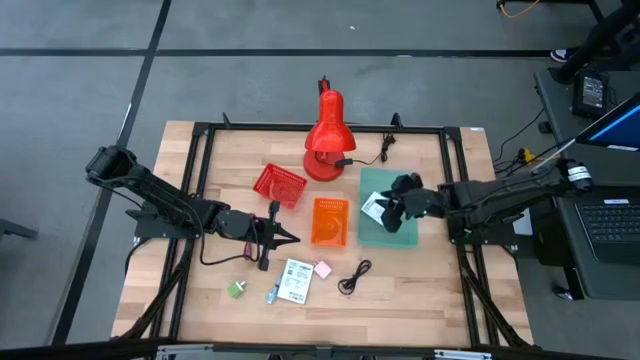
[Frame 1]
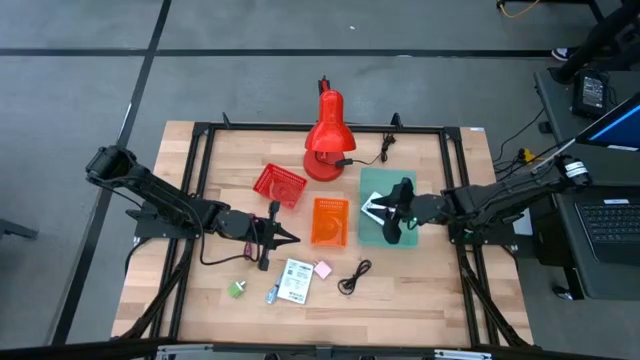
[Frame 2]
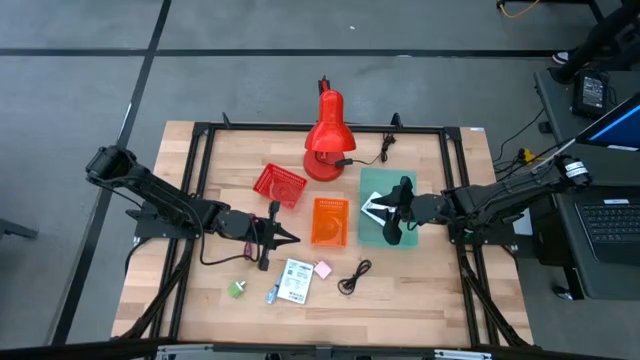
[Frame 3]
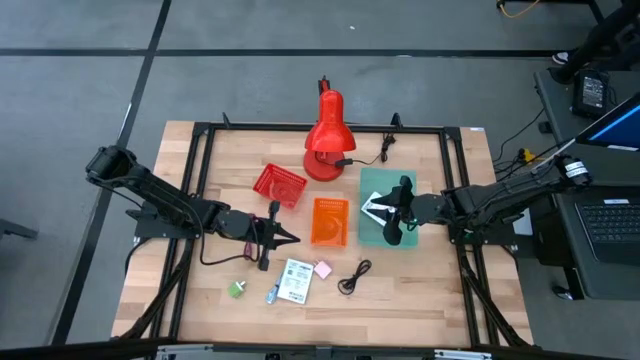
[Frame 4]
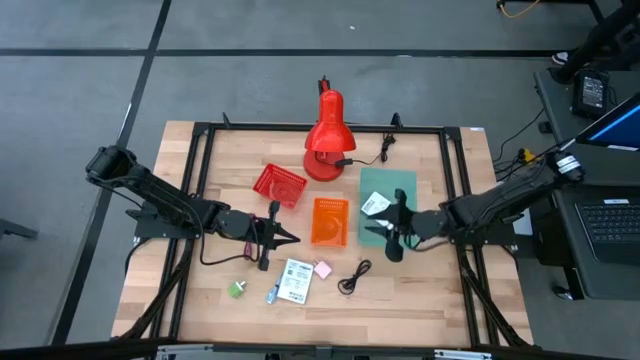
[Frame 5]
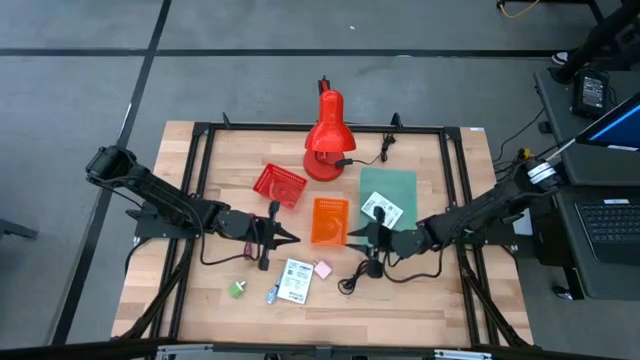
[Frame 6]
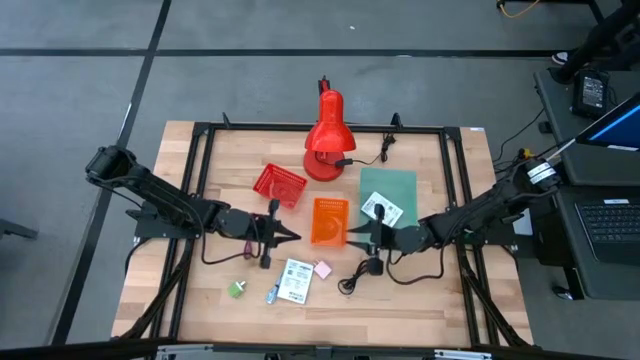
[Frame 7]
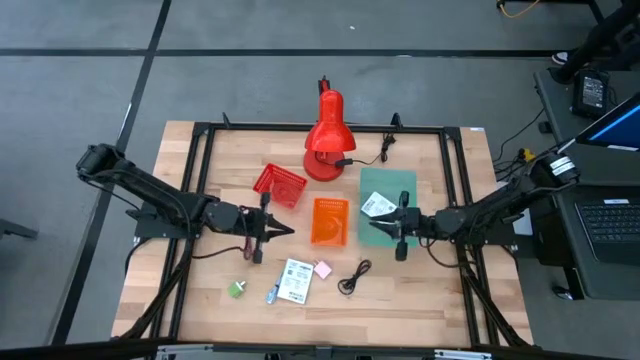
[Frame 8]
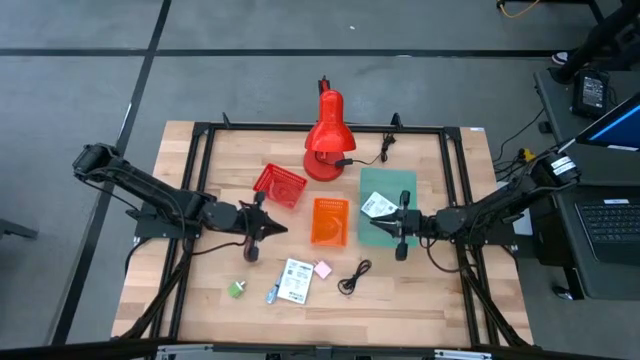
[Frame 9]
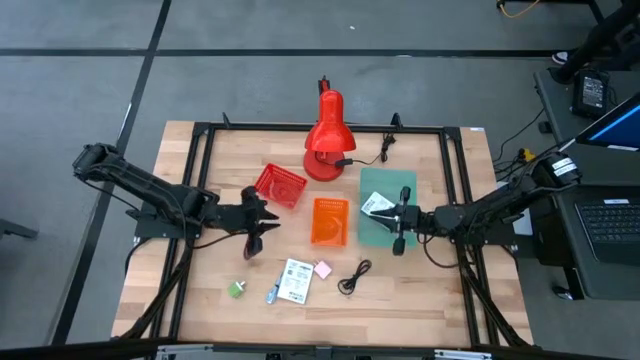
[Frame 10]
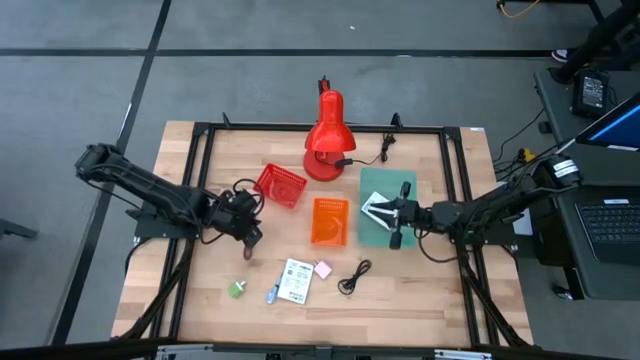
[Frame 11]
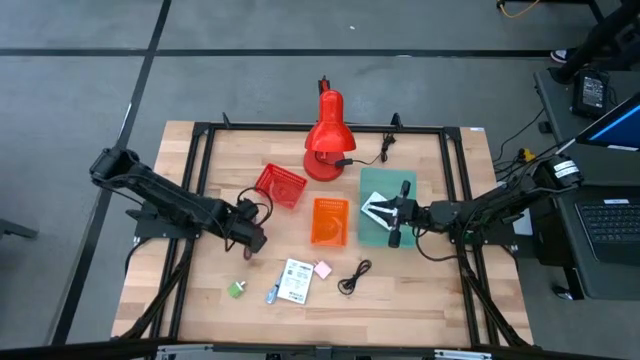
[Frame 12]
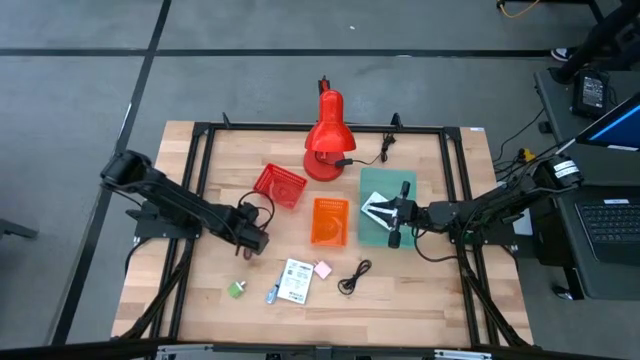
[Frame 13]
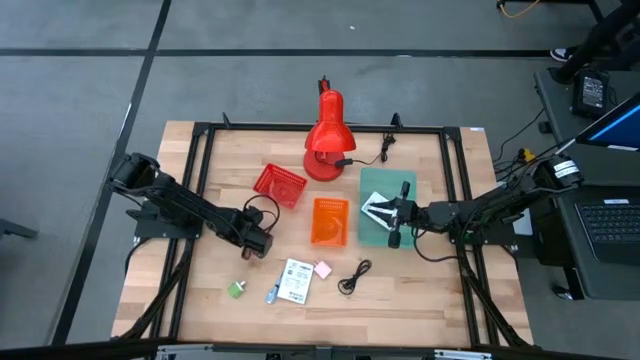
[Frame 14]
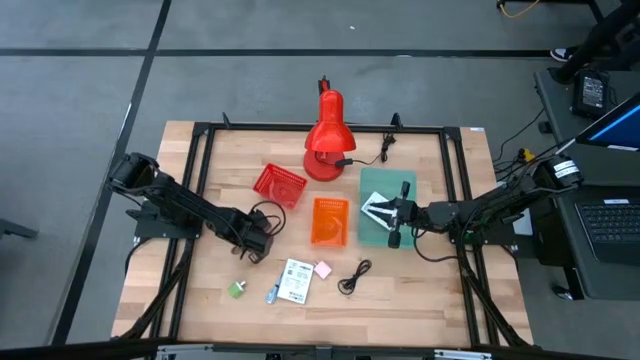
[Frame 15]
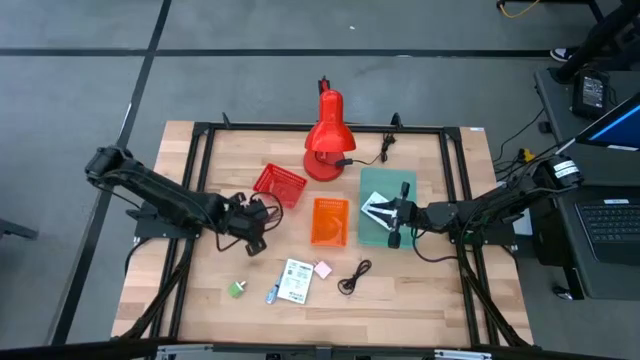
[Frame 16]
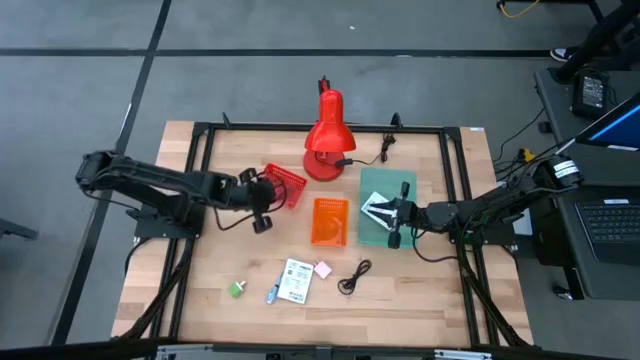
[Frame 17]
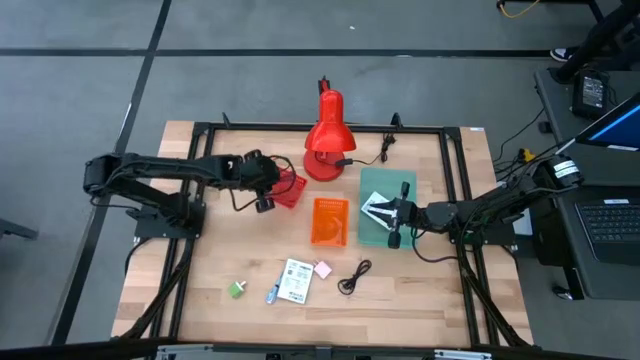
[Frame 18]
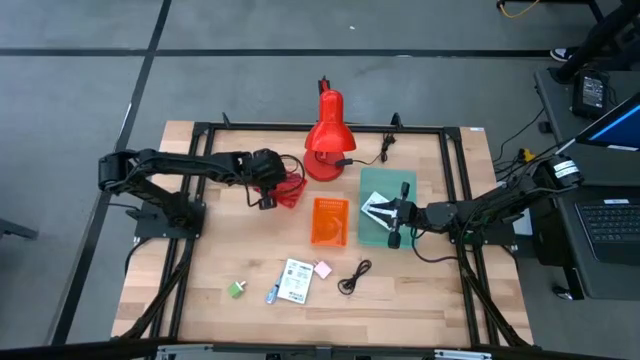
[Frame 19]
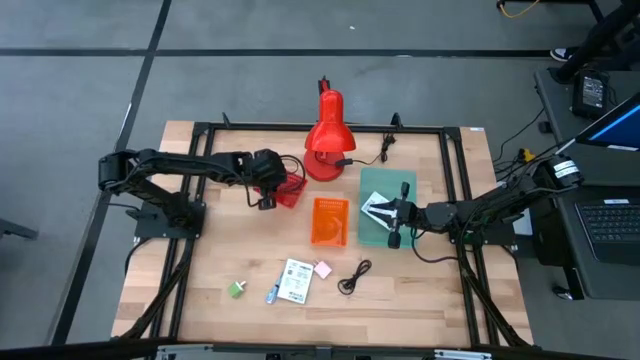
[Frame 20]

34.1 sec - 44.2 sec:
Task: Pick and place items into bin
Put the purple USB cable into the red bin

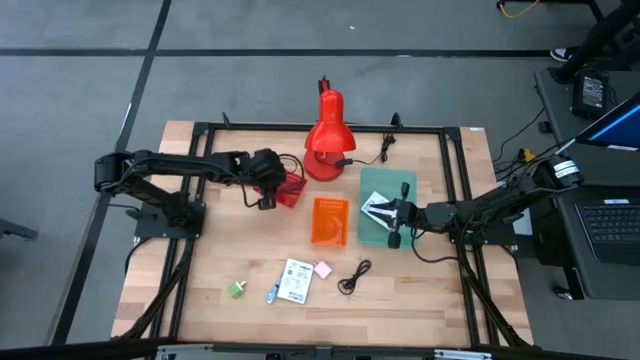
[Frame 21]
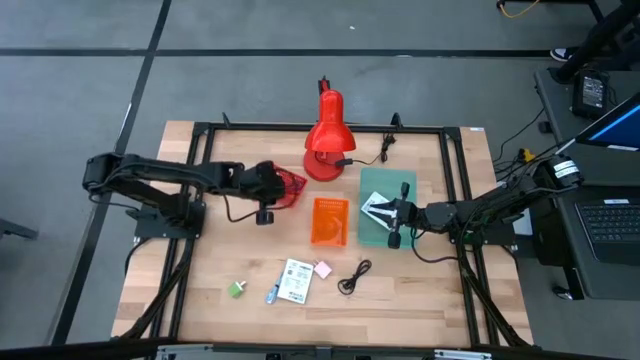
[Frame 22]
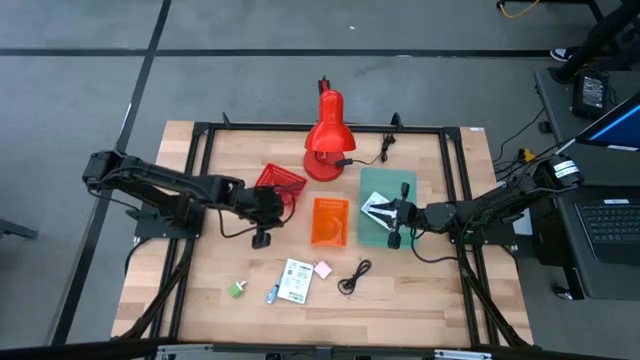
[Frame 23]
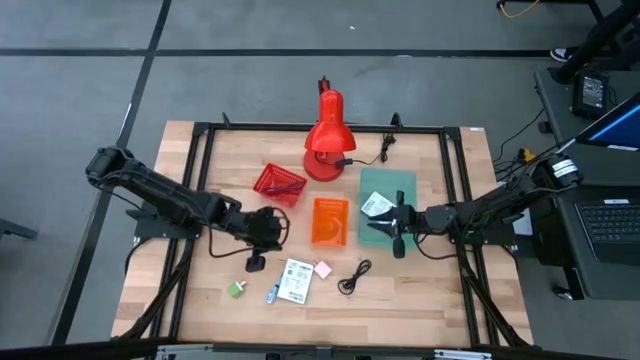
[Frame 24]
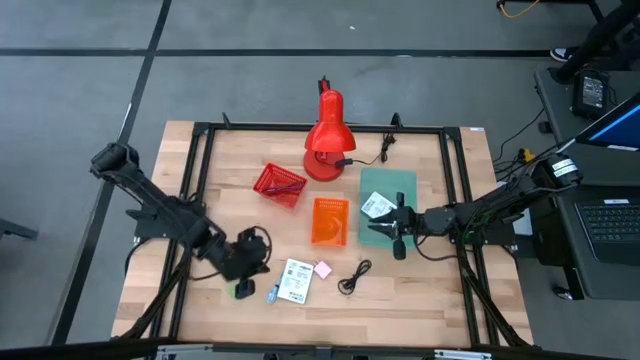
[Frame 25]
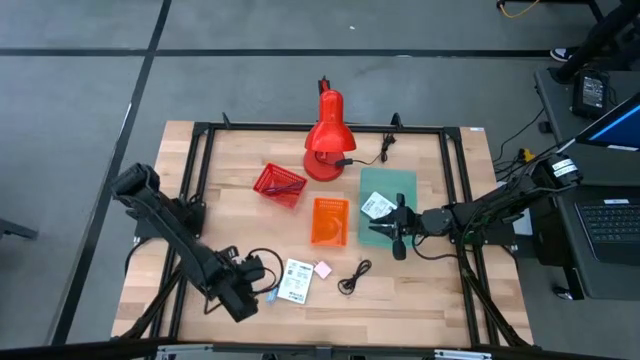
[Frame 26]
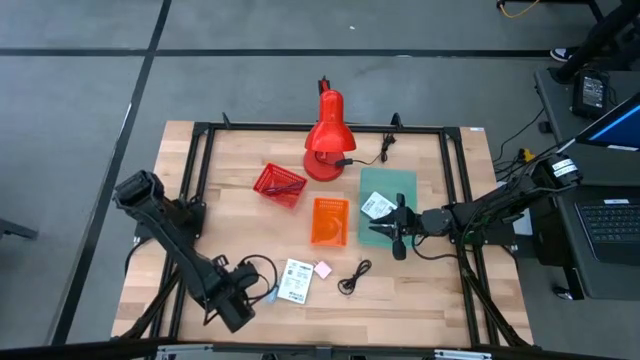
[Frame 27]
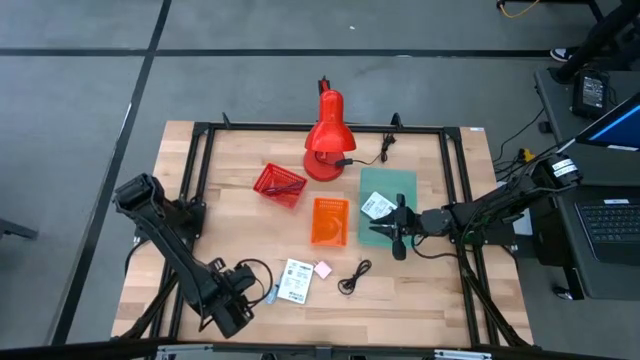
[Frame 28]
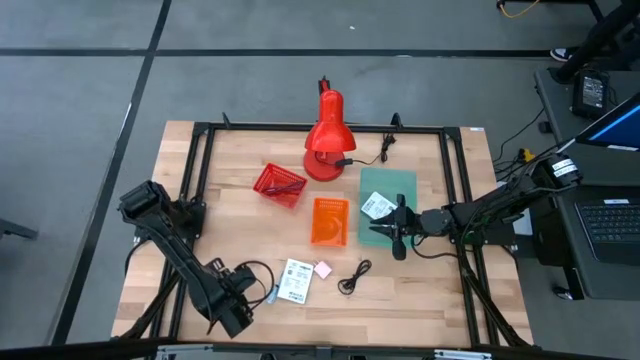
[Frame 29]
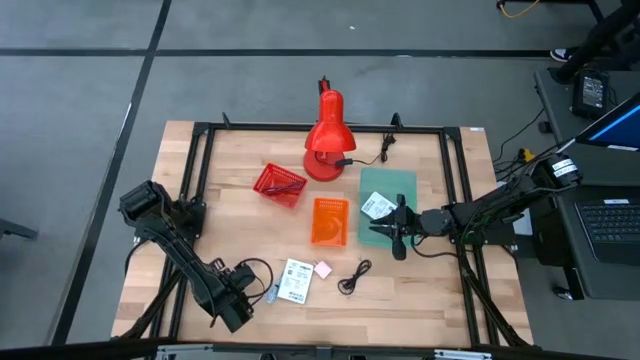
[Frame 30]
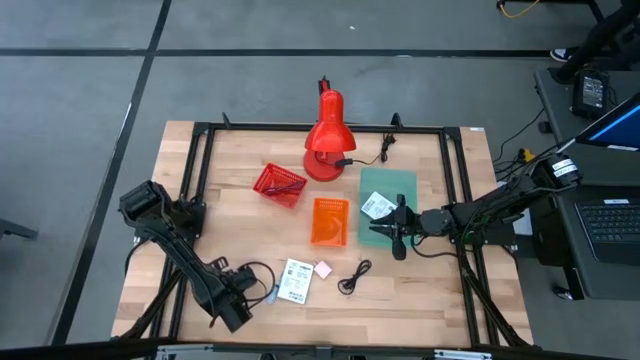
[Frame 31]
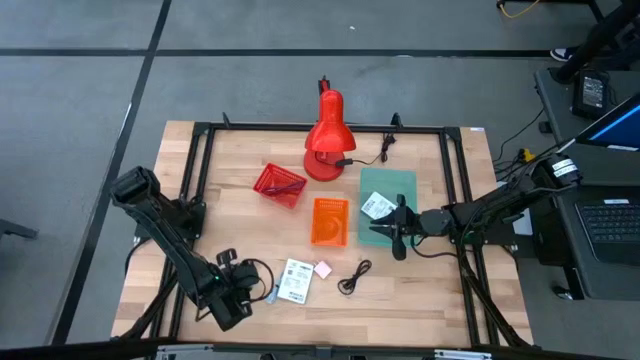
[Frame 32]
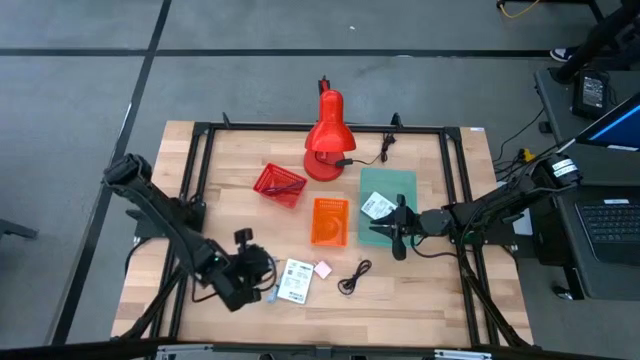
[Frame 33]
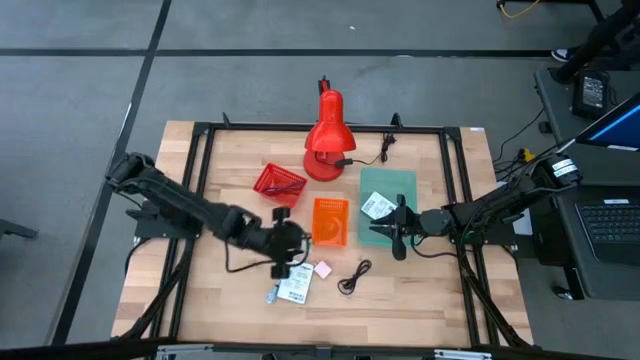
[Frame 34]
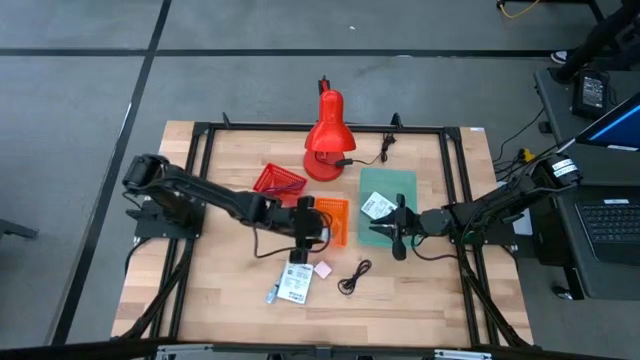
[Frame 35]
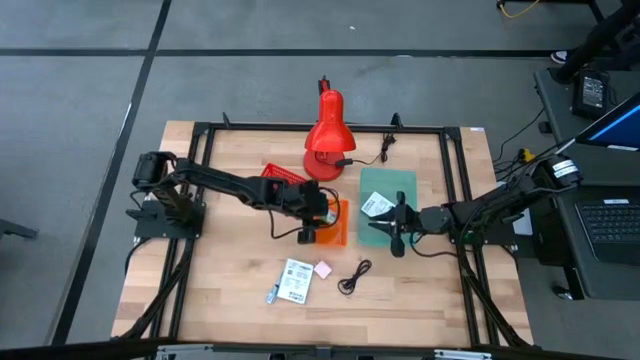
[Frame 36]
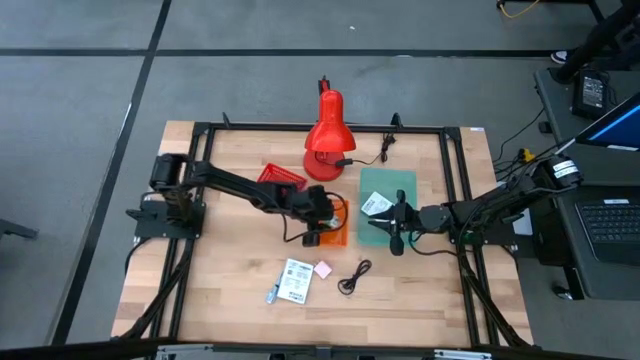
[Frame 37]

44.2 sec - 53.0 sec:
Put the green charger adapter into the orange bin

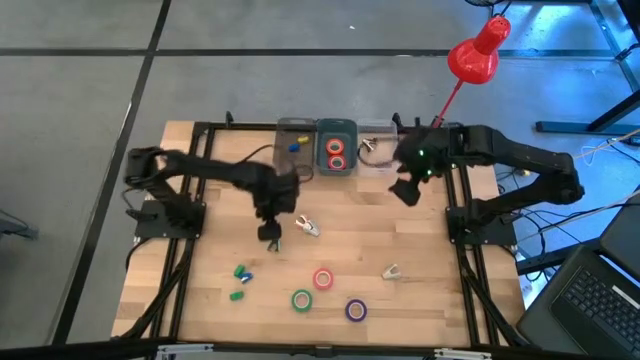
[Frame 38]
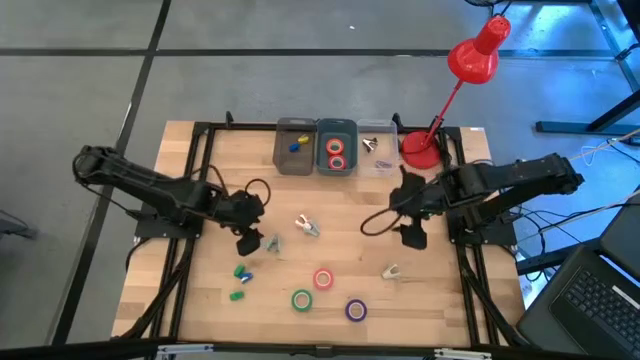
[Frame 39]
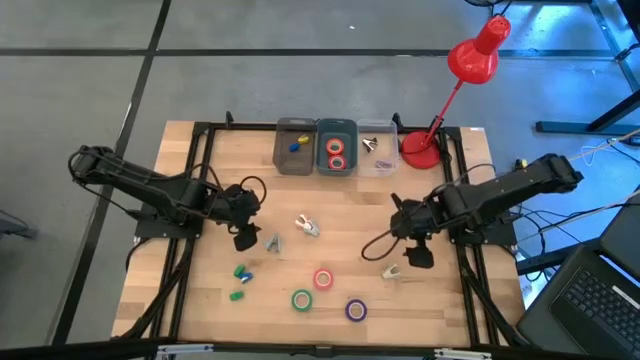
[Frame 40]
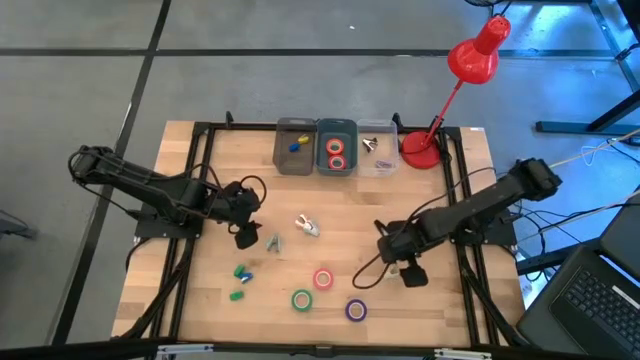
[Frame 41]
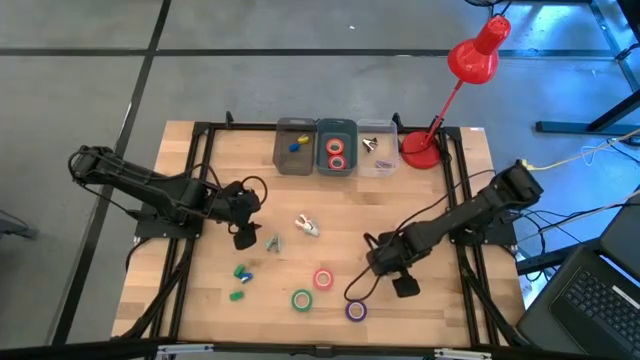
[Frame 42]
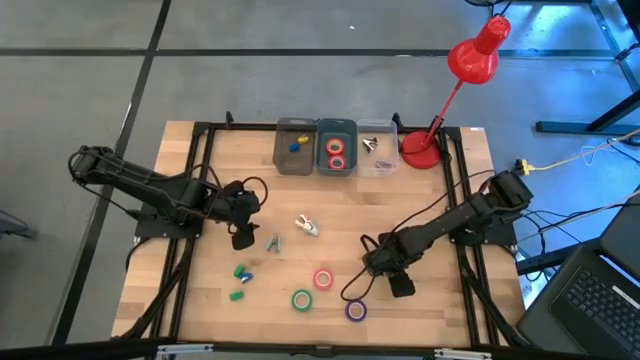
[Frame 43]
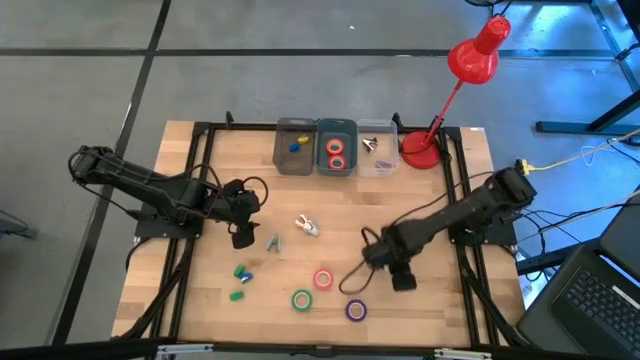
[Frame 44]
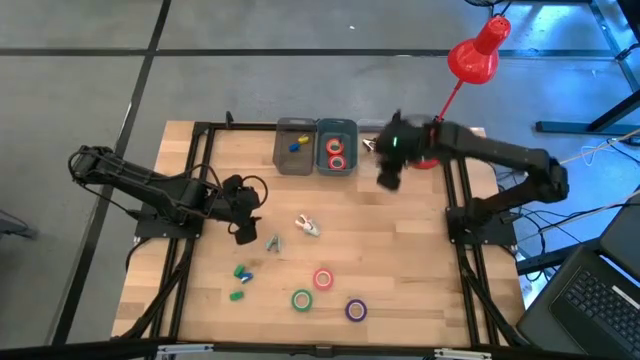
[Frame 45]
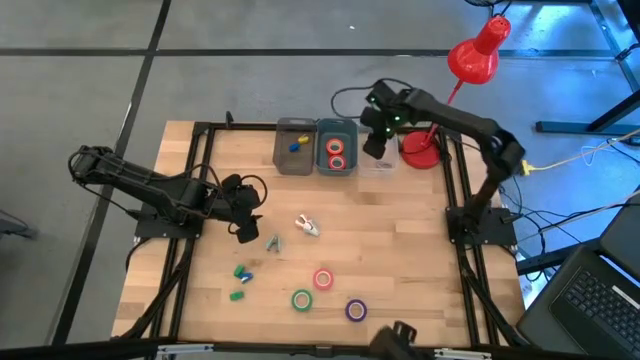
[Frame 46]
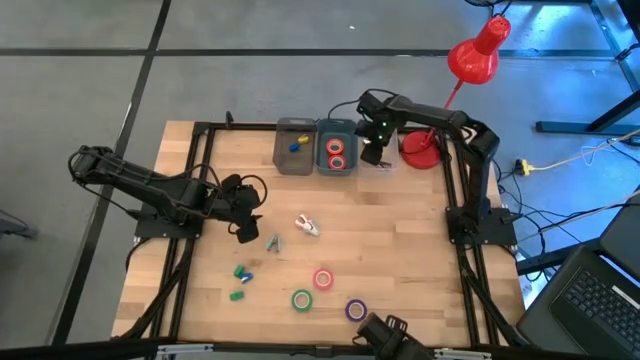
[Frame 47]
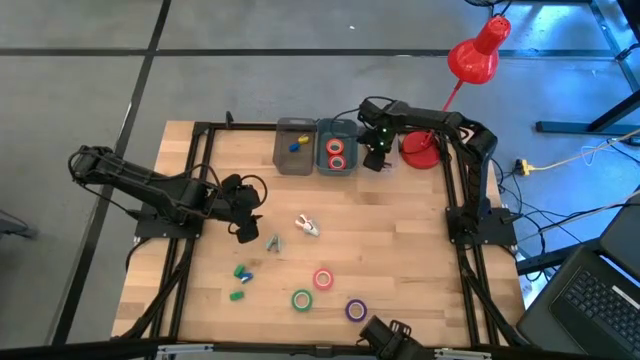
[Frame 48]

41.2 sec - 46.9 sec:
Task: Pick and place Stapler, Stapler remover, tape
Put the gray staple remover into the transparent bin
